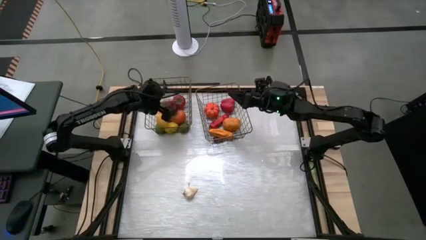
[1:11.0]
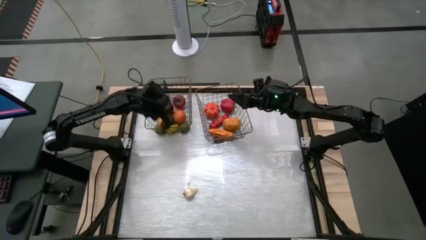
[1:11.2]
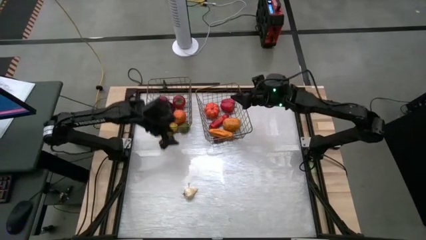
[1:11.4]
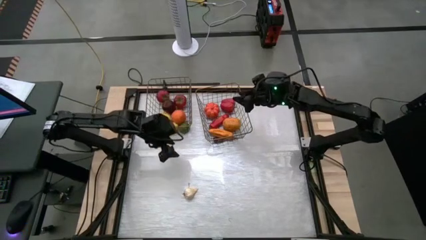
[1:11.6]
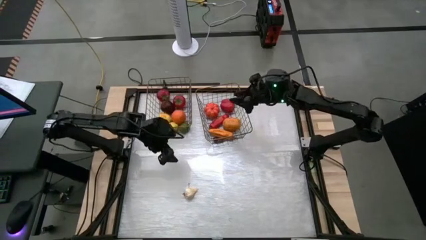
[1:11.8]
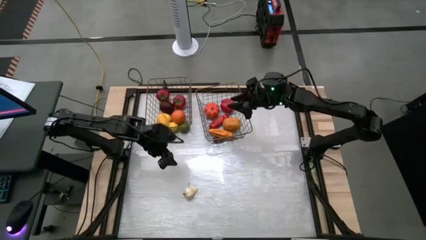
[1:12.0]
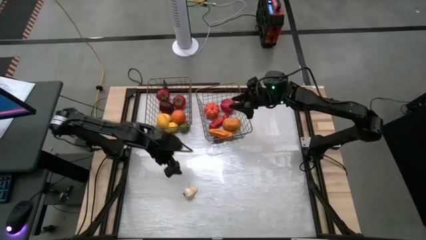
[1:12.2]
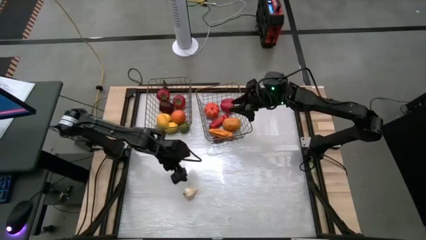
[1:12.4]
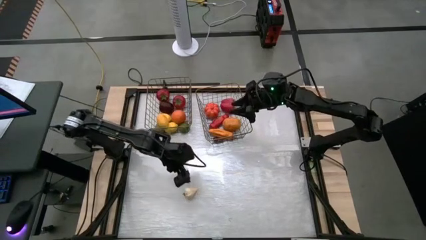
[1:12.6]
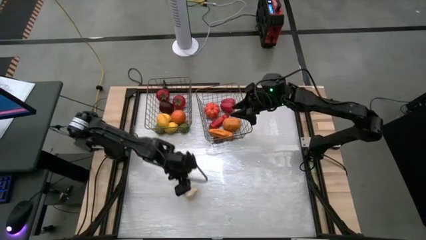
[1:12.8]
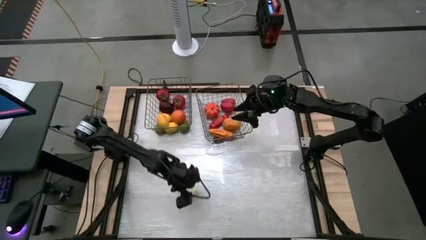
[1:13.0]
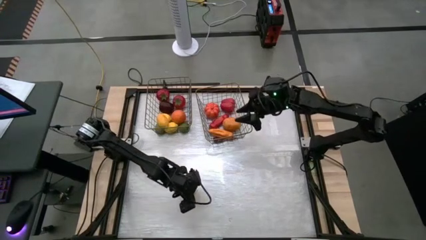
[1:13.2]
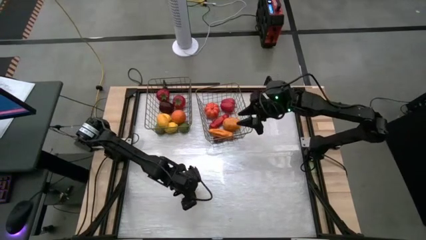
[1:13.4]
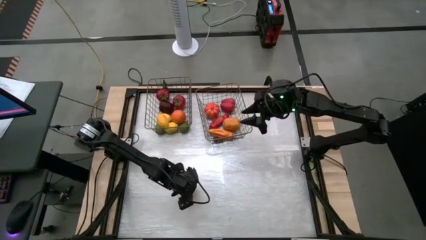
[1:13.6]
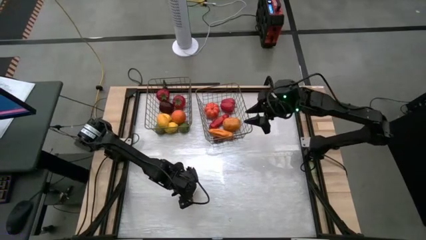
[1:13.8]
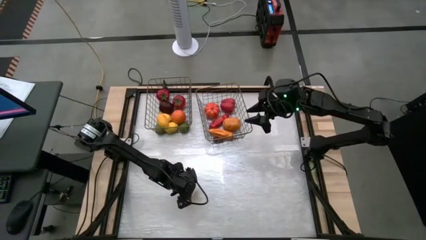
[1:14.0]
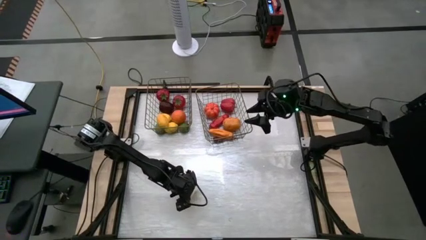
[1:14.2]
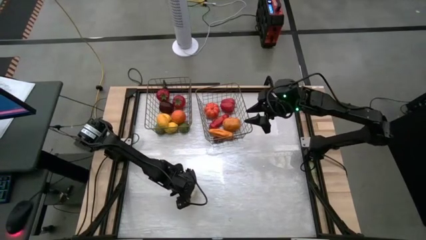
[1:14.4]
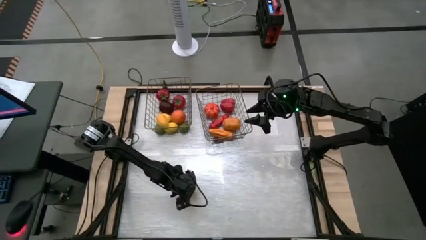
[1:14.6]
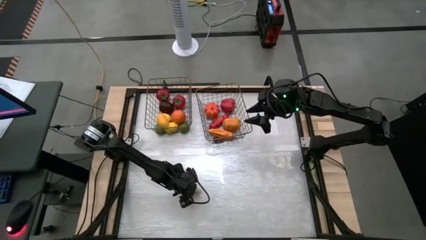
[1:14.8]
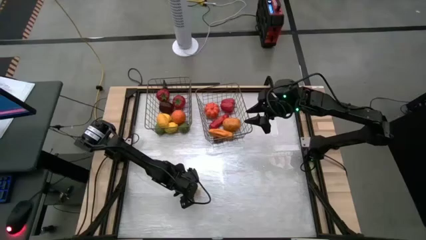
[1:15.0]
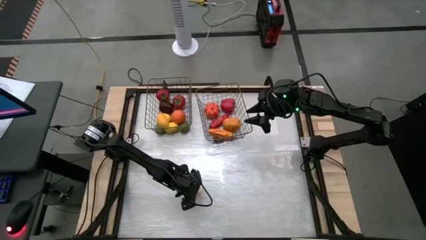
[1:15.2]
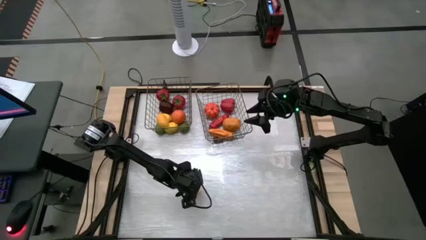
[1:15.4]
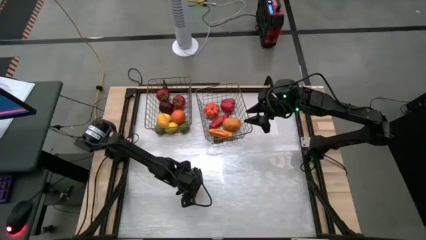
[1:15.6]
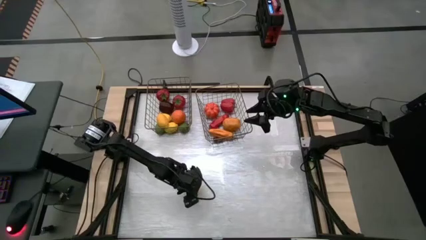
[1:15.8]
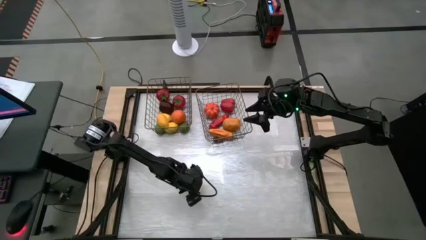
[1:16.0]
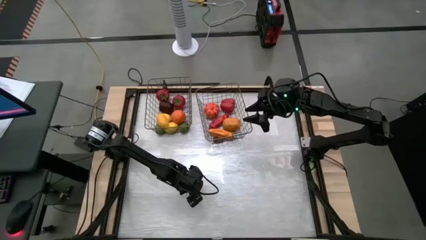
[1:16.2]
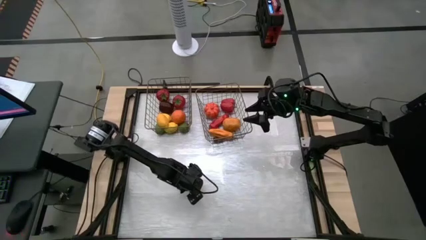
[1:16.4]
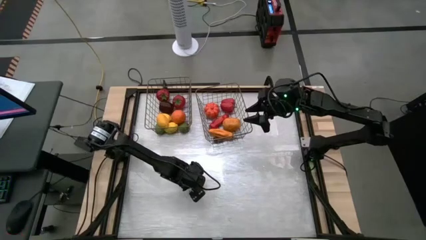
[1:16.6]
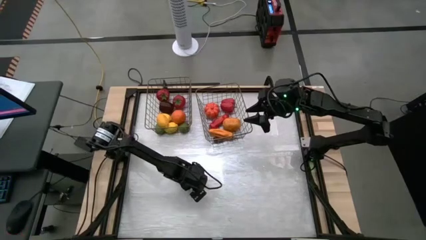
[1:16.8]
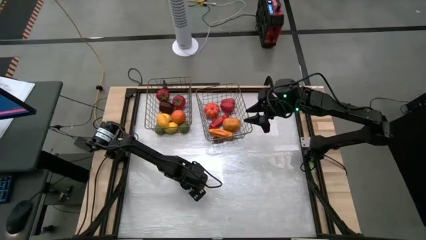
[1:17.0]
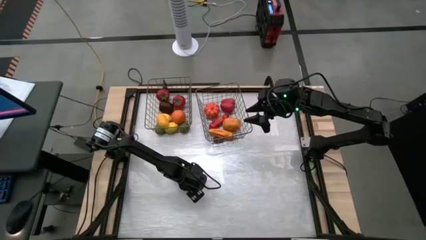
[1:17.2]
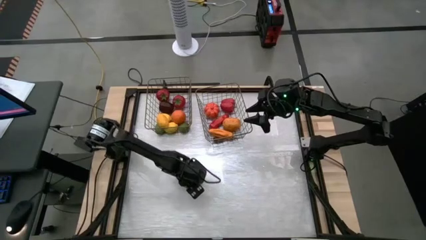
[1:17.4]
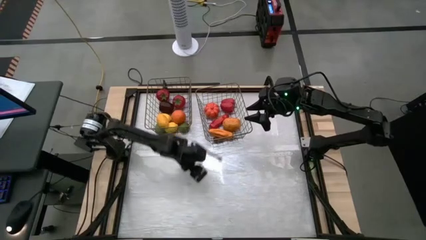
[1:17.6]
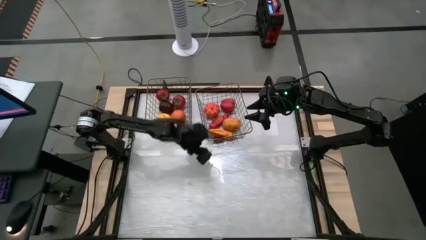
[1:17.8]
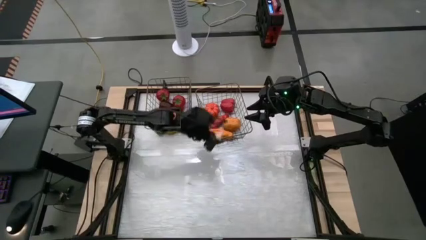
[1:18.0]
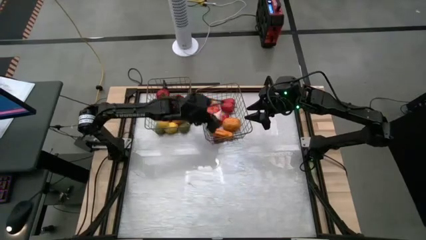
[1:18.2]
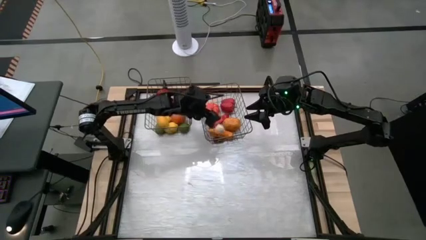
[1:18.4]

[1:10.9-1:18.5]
Task: Sort produce into baskets
Put the garlic into the right wire basket

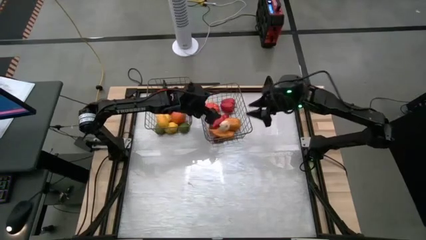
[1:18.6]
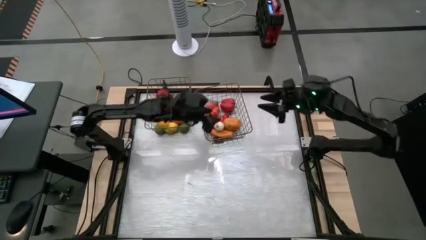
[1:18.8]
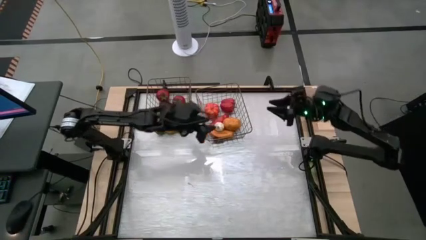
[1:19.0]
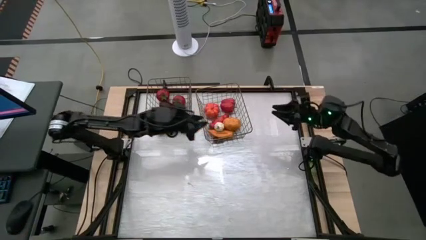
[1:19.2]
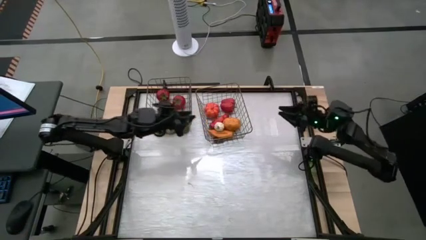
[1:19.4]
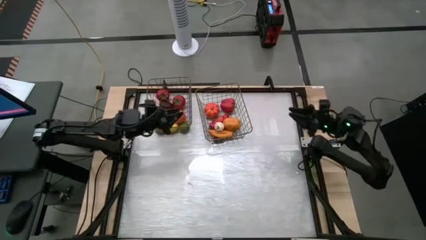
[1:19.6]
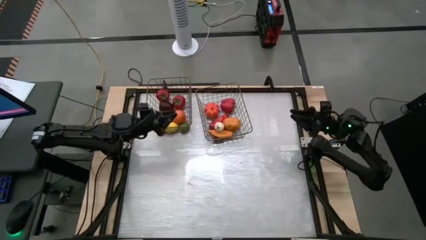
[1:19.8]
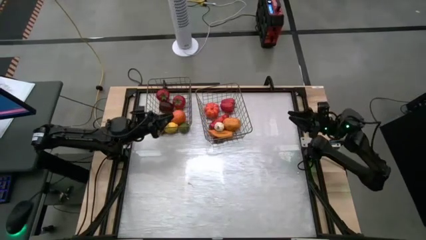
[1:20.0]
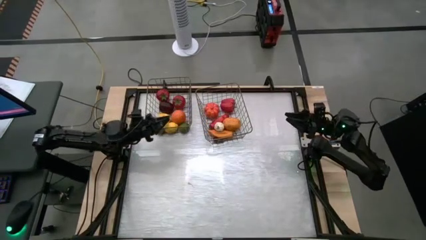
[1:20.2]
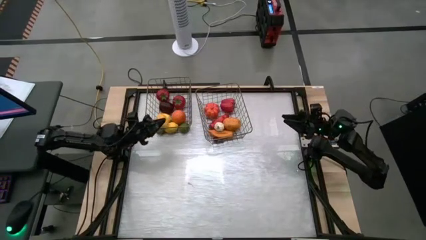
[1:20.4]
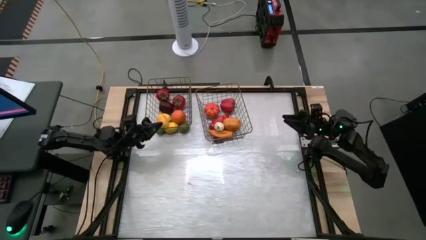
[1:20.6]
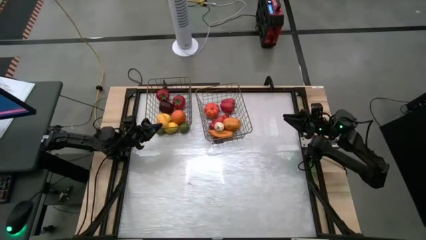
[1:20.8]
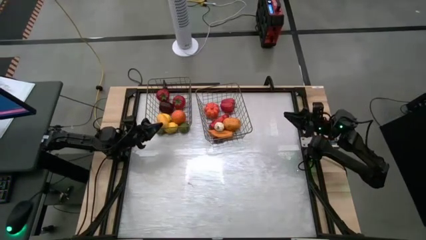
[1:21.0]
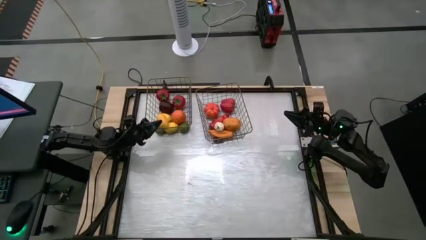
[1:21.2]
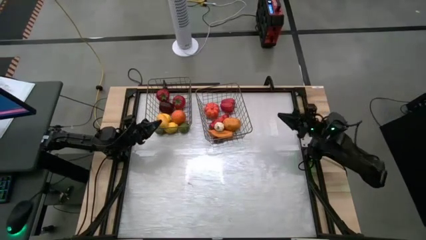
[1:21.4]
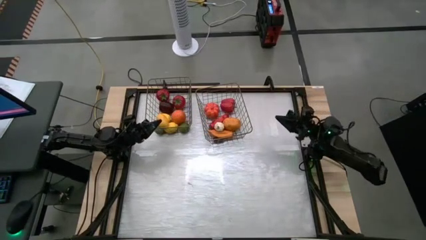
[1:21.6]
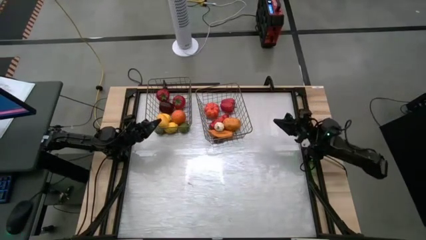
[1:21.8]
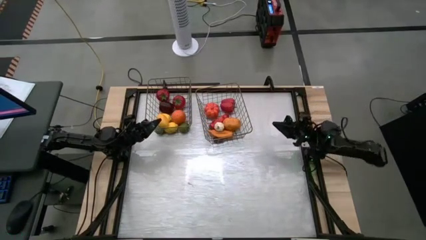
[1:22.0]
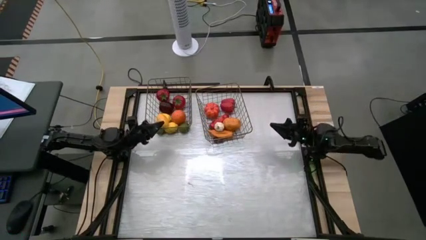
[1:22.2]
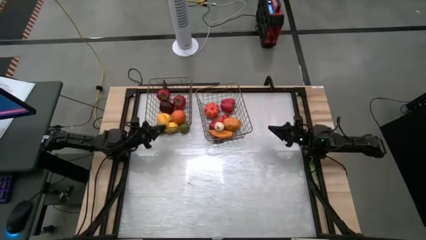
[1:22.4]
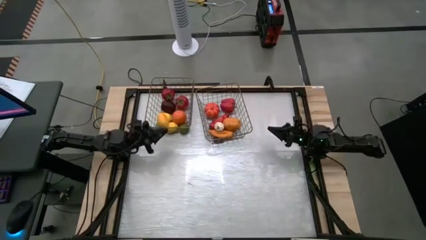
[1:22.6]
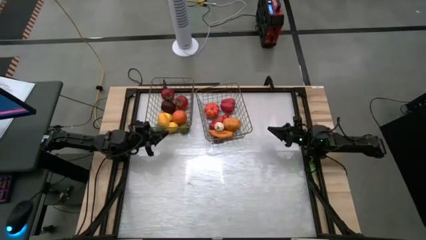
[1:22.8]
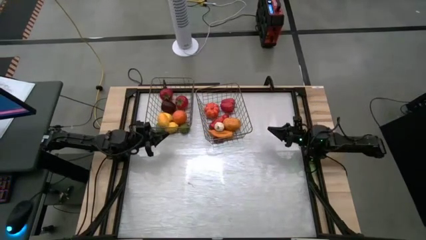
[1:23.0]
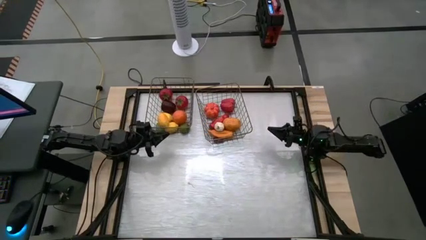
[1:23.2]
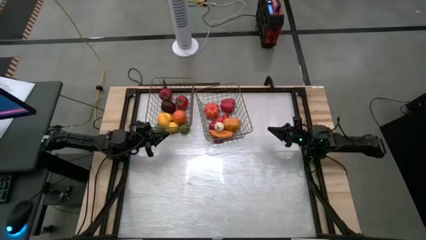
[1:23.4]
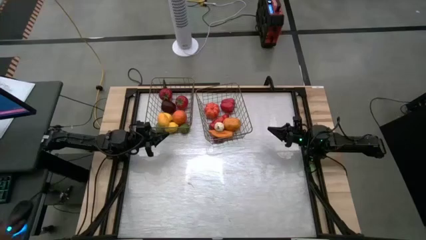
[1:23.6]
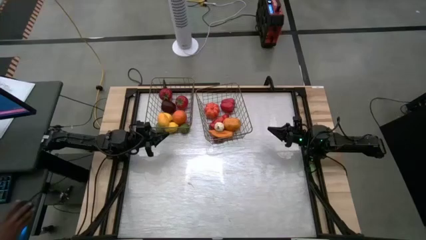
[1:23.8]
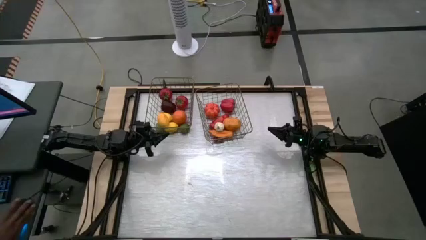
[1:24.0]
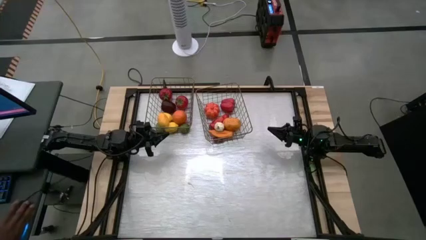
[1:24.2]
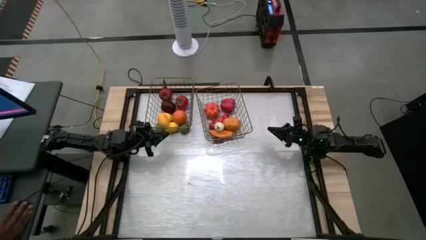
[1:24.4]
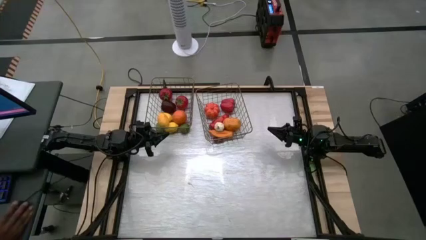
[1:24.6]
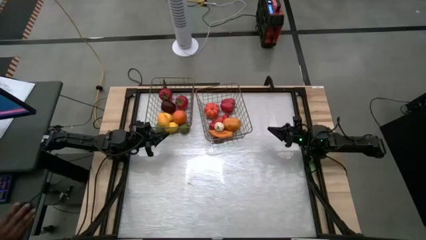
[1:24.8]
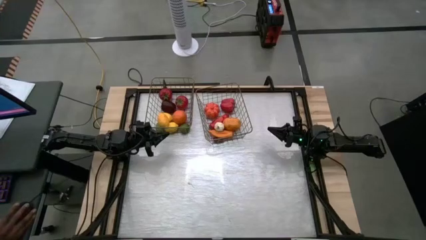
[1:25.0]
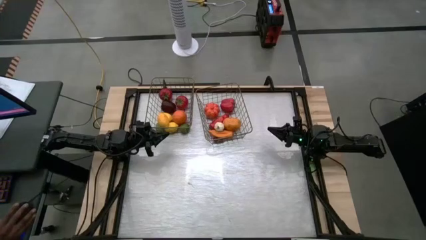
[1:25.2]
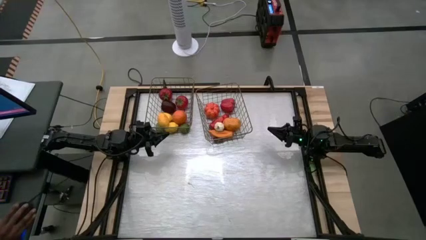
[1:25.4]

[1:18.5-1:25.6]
Return to Home Position

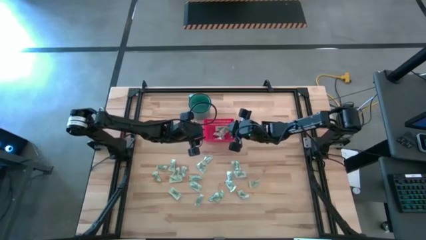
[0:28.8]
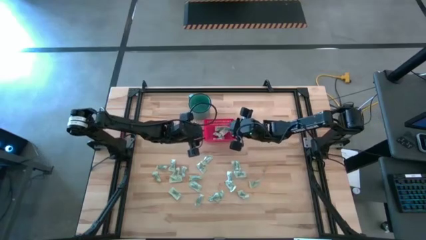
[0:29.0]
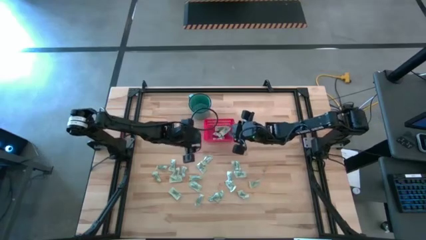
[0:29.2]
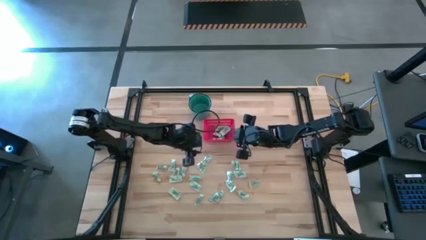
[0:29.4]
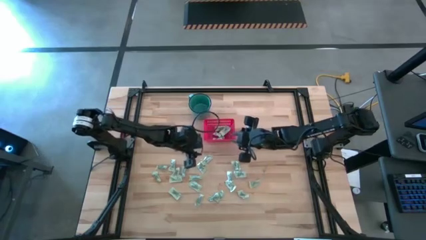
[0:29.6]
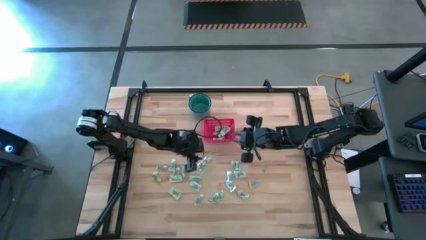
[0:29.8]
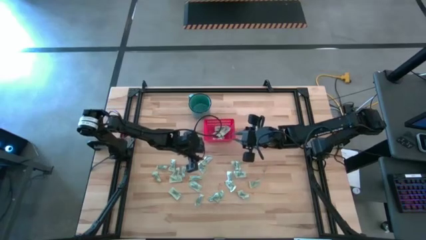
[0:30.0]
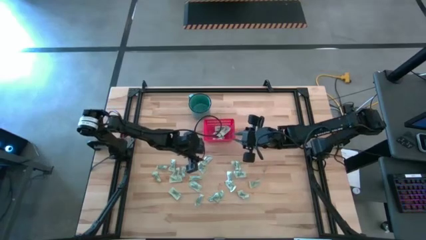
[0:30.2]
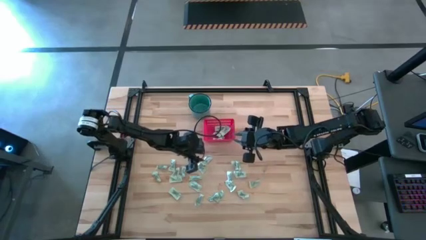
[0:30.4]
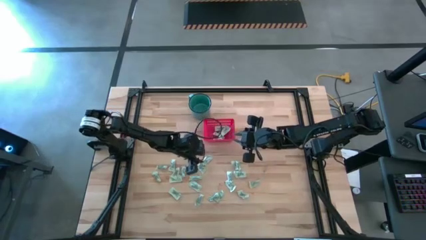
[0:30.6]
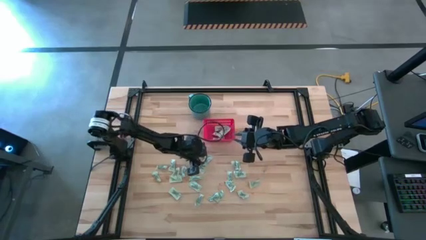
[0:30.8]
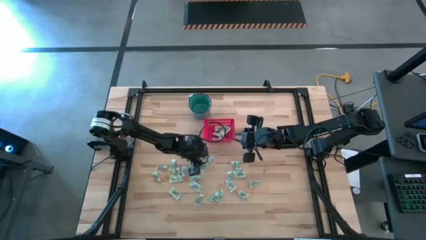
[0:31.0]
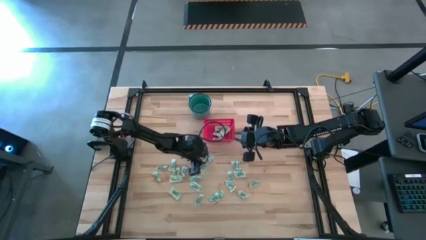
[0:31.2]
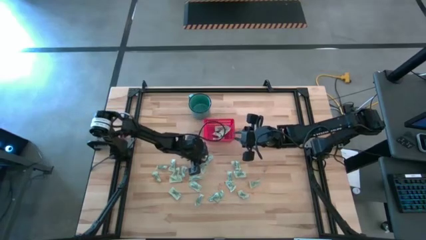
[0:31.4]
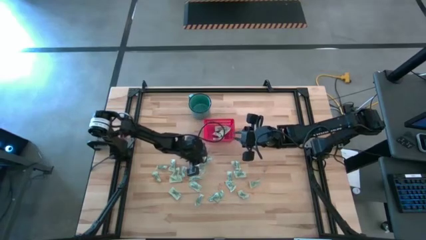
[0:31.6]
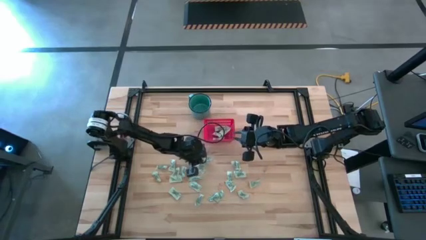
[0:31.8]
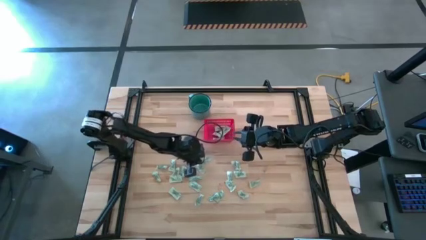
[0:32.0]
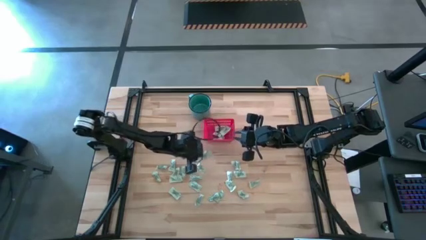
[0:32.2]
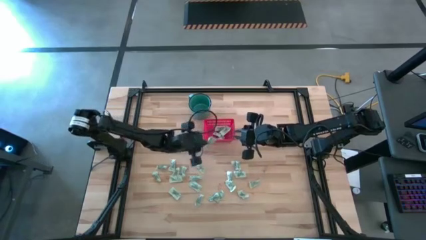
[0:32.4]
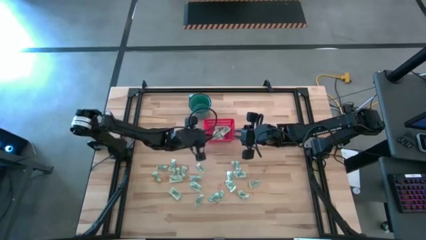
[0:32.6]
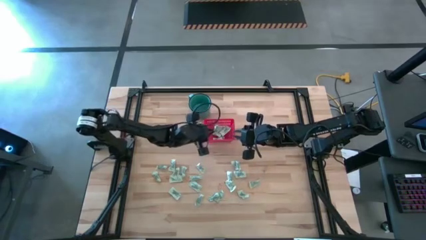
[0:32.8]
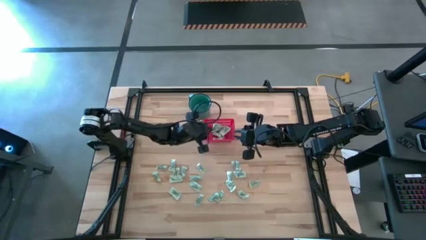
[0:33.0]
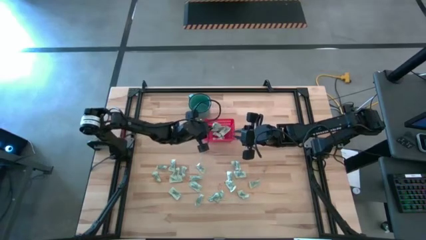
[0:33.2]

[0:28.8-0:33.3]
Task: Pick and place items into bin
Put the light green stevia packet into the red bin
